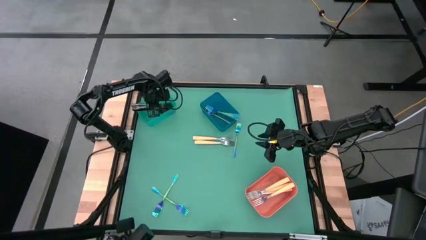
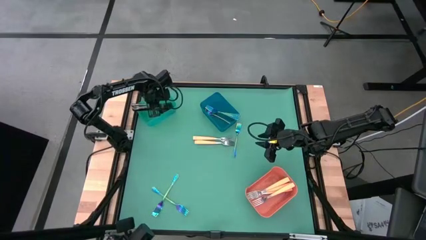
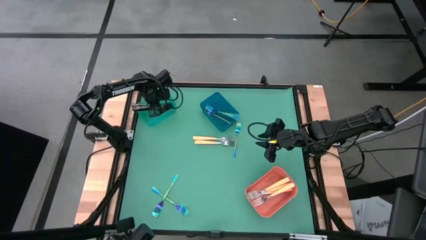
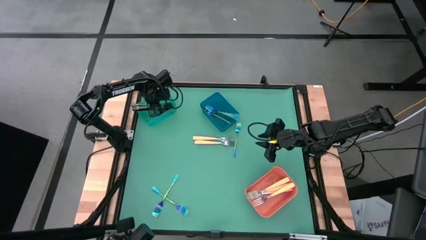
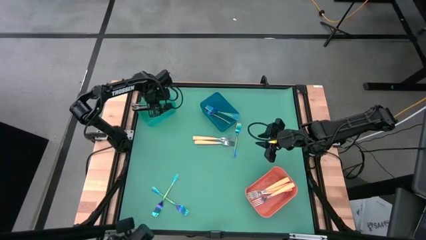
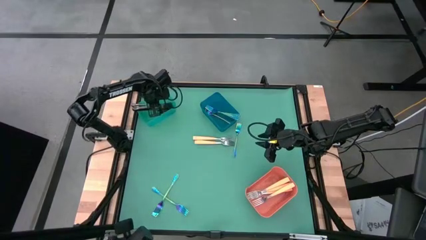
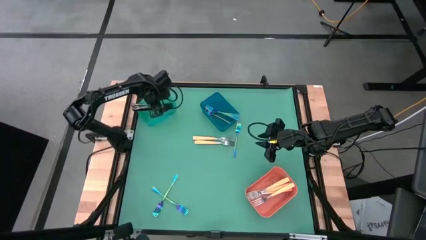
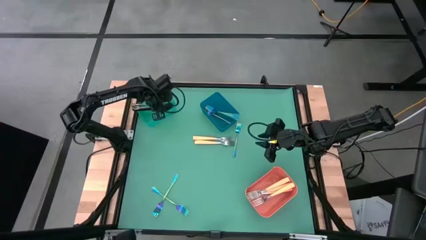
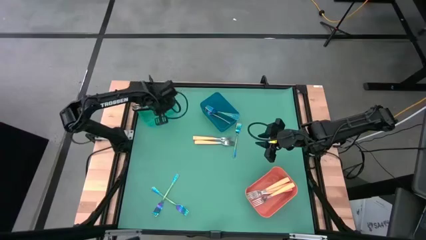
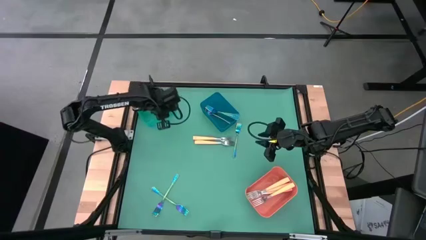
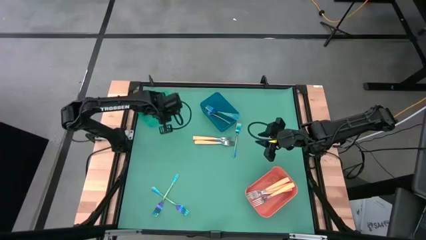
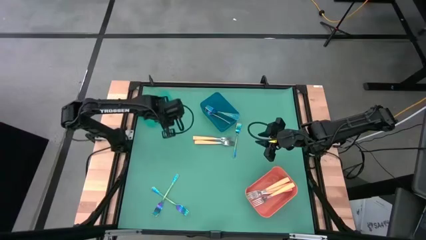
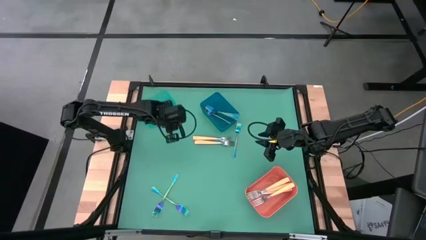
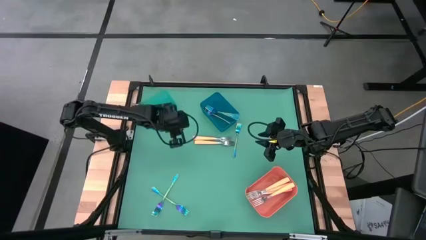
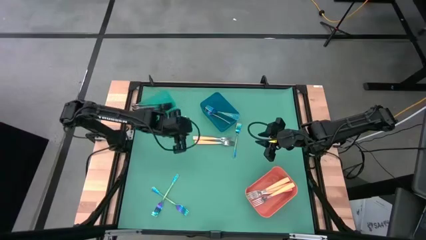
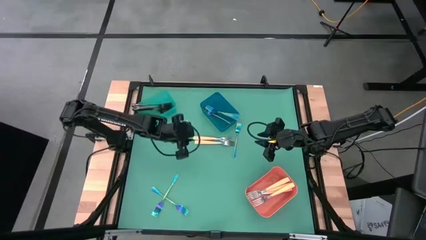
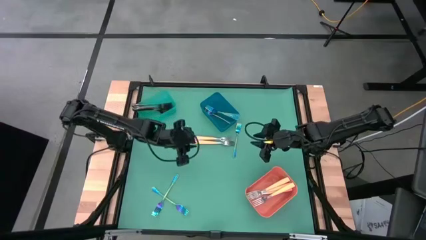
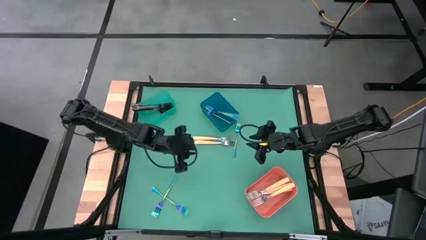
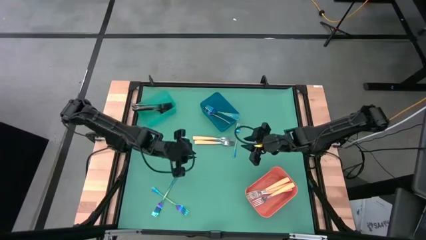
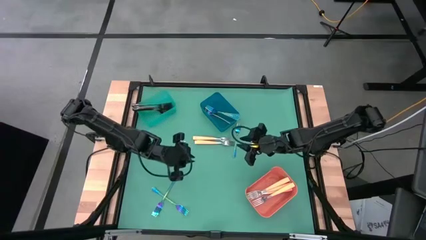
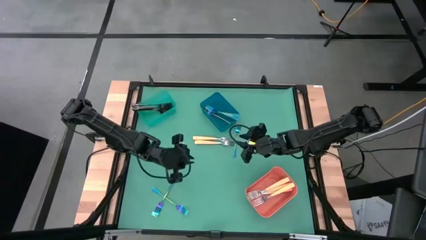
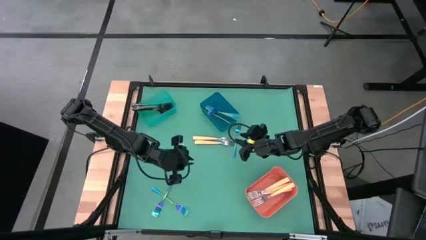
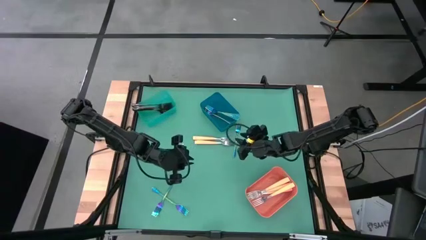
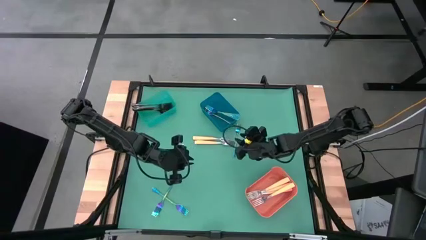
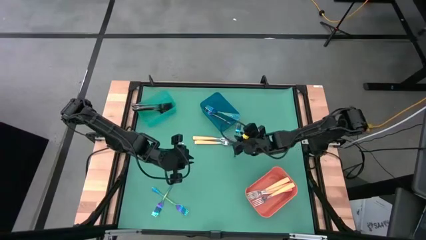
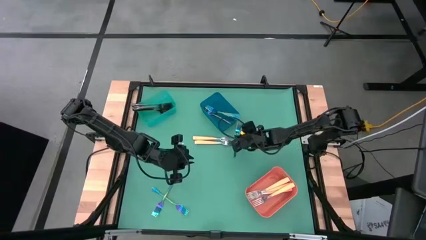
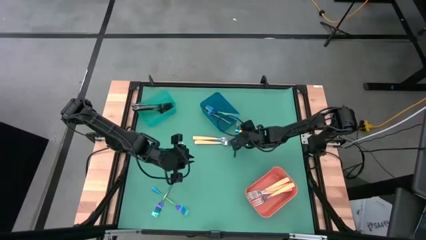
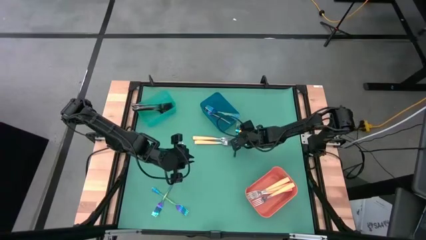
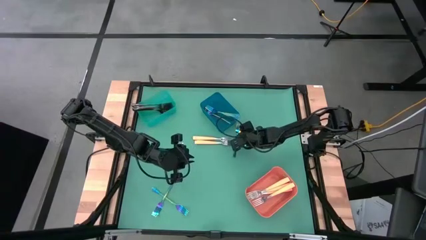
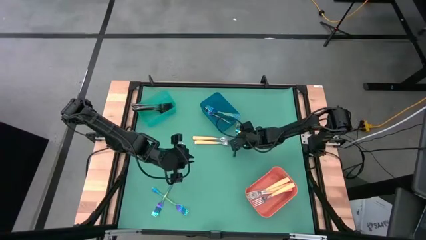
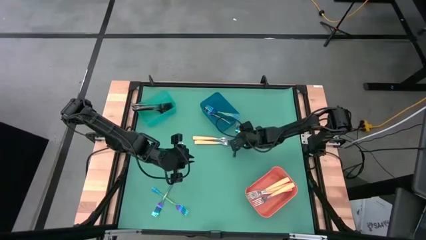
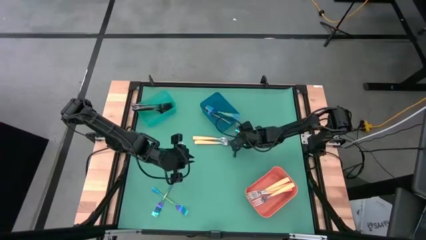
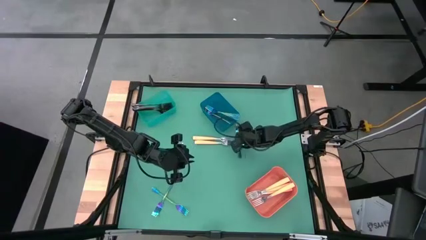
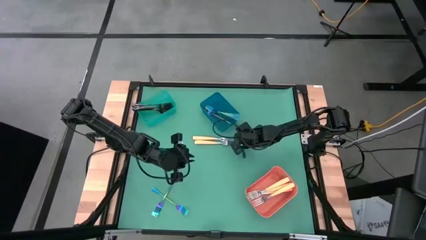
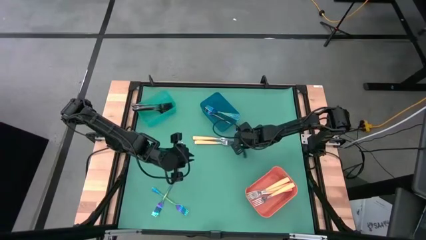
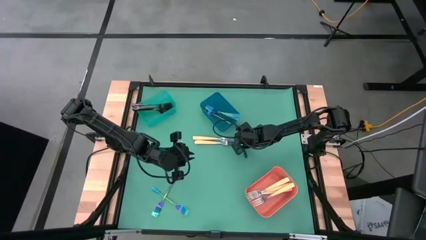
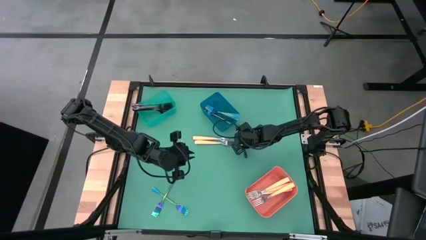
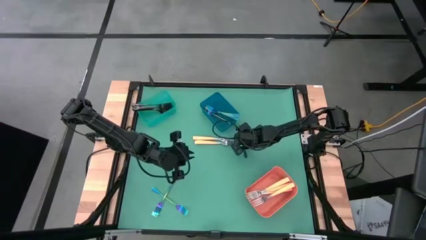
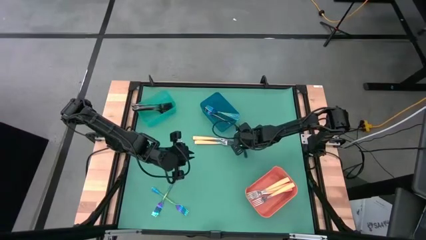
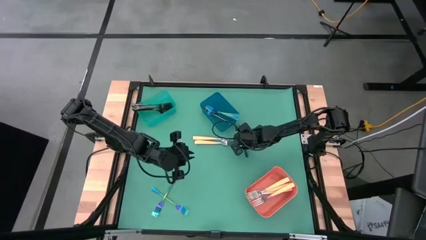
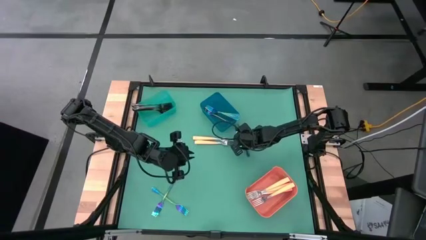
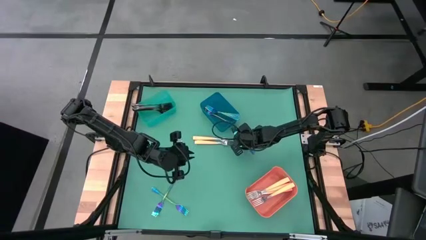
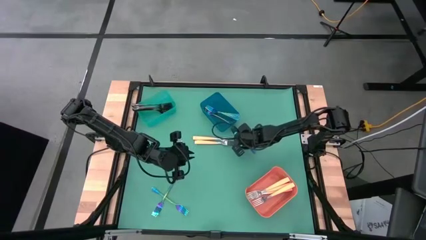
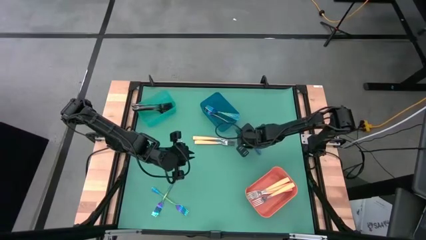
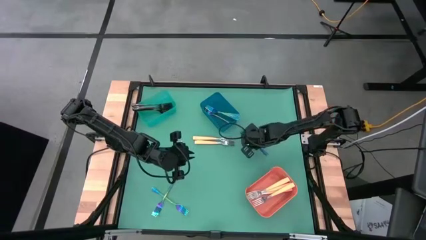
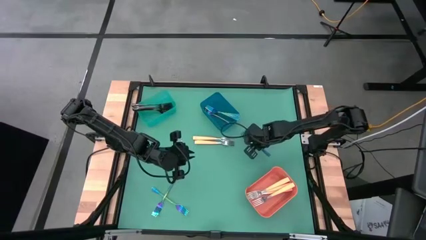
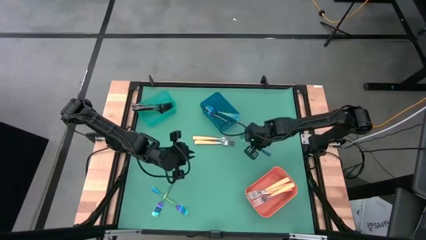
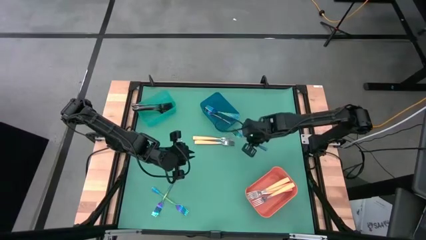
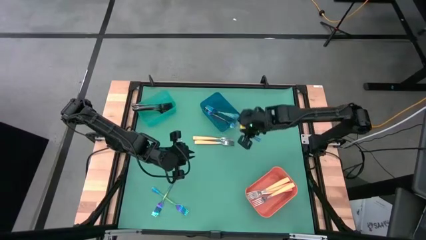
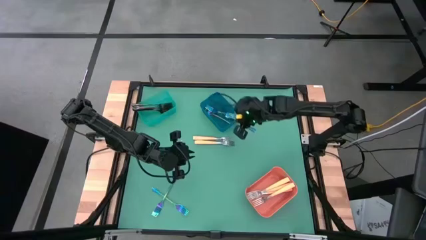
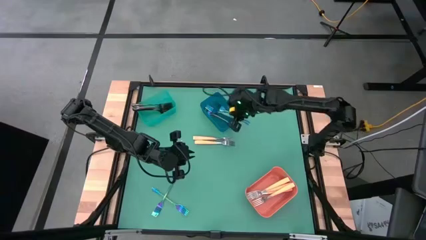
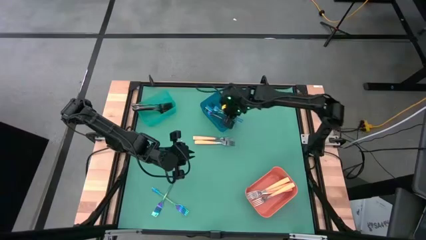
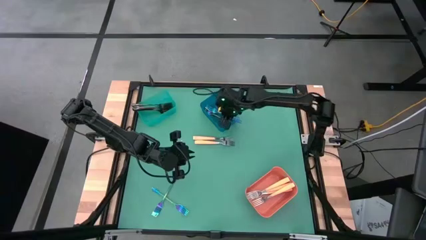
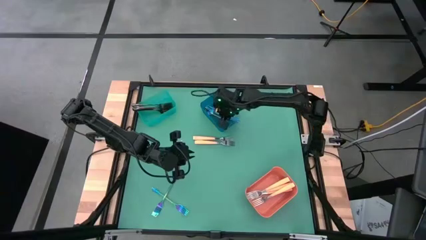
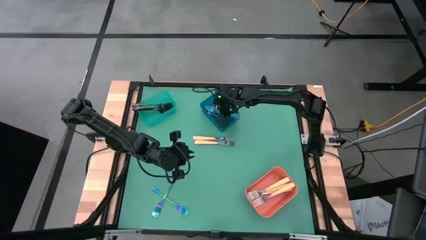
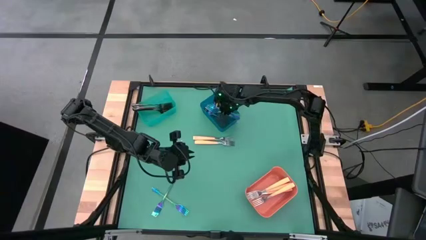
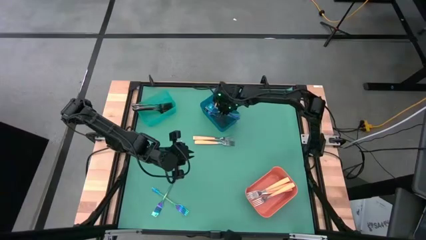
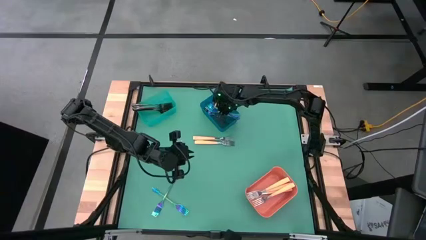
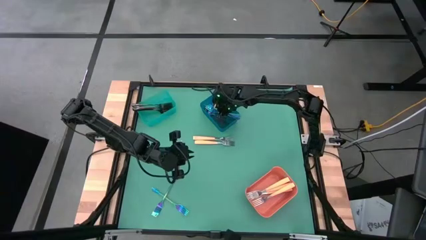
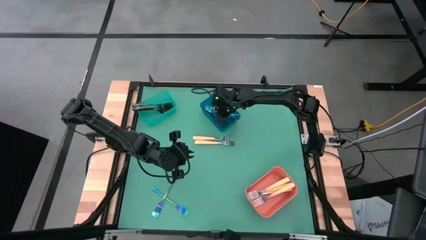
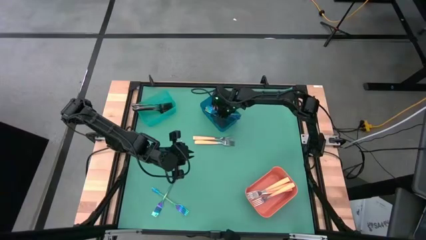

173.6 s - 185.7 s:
Task: Sort silverware by color (type)
Put the purple fork into the blue bin

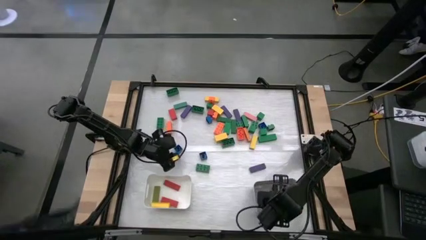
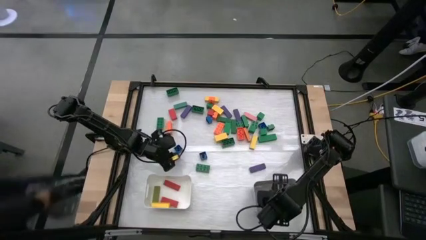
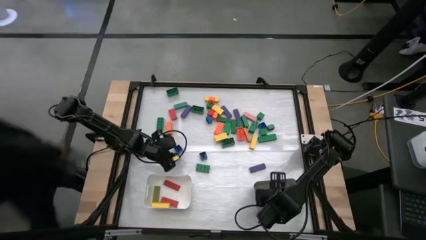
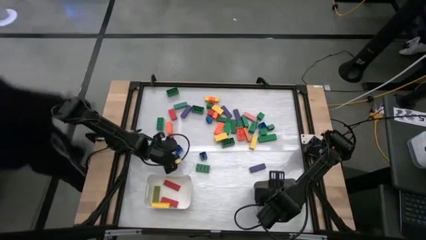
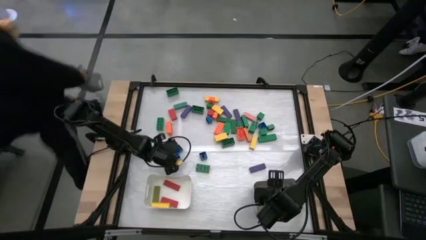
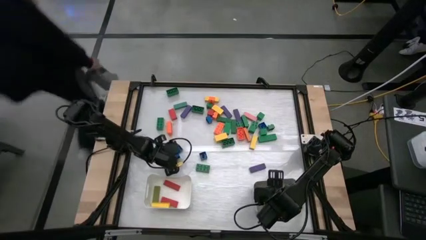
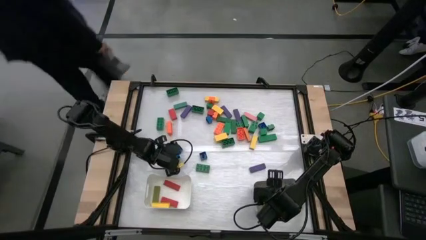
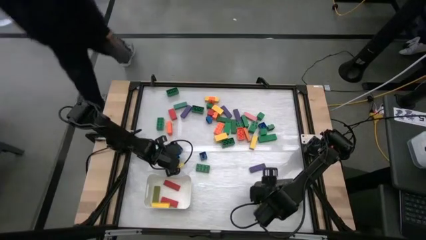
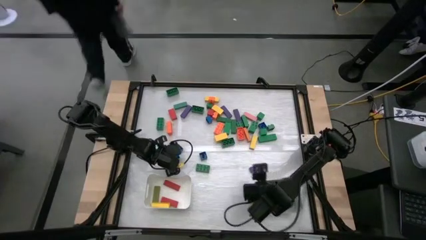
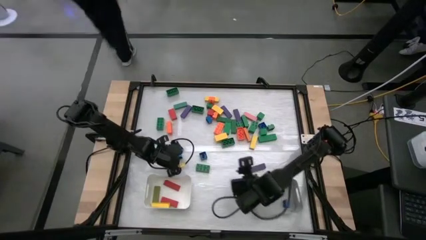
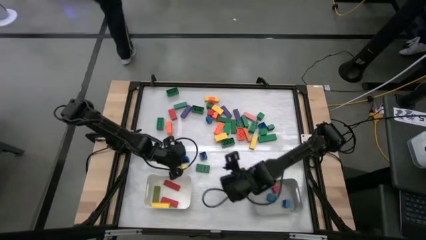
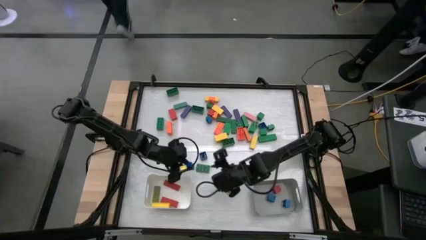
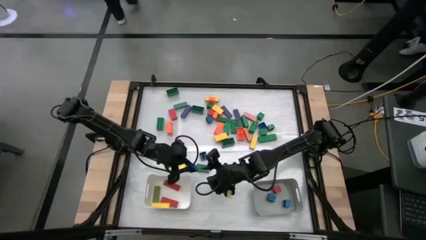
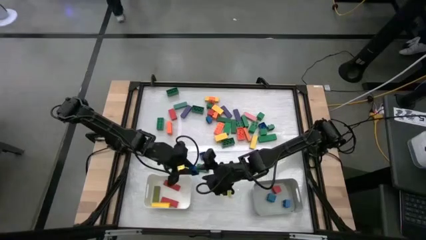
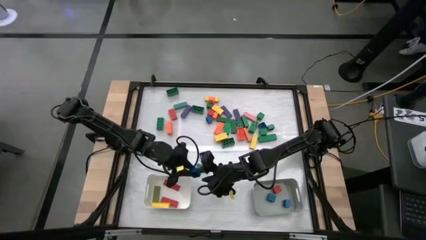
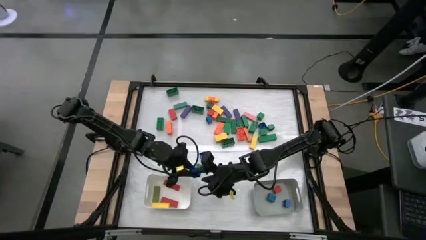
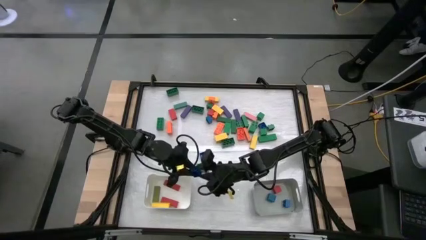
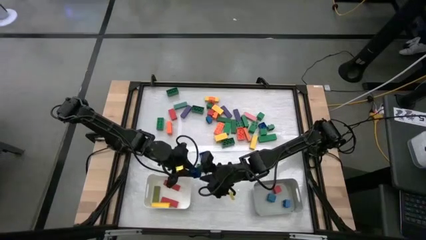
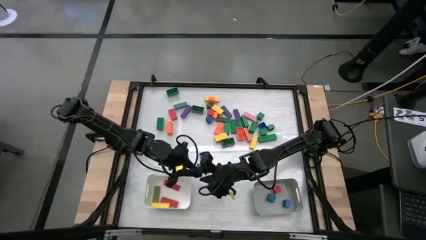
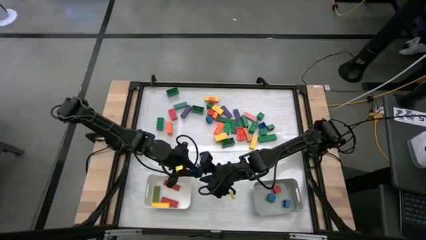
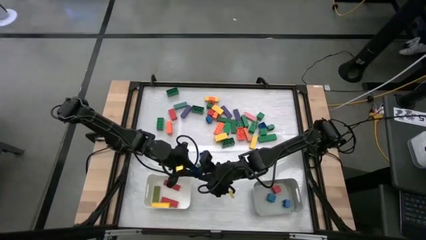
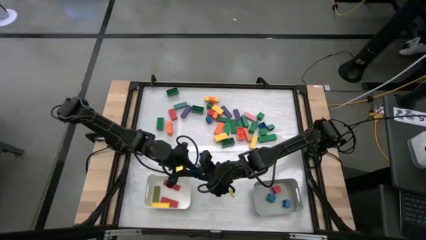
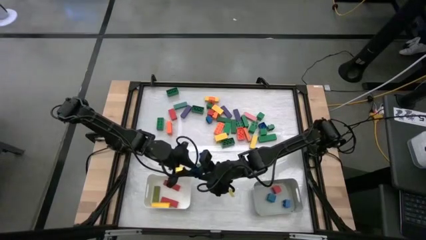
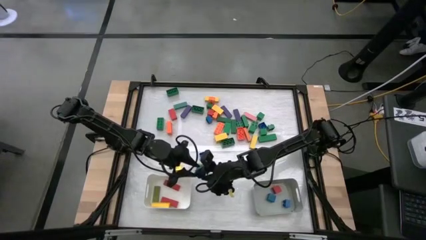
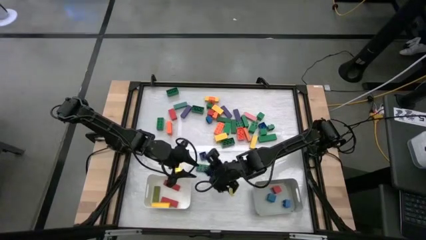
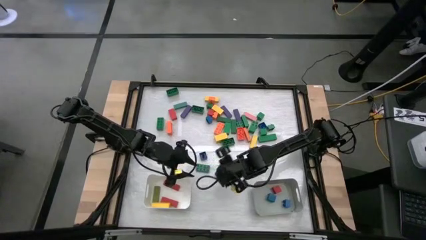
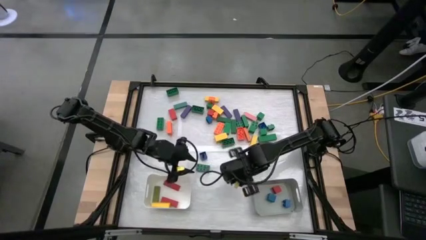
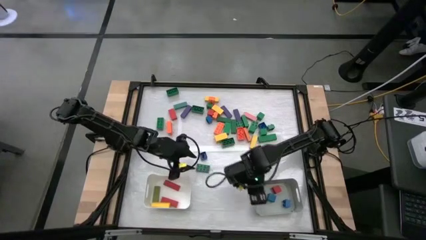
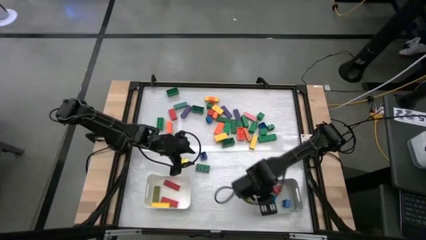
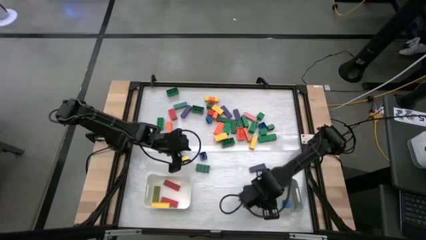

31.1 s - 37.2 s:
Task: Sort blocks by size
Put the square blue game piece into the gray bin
